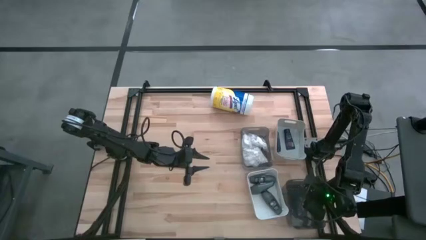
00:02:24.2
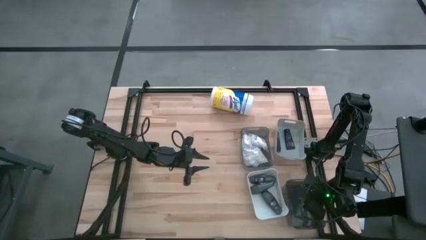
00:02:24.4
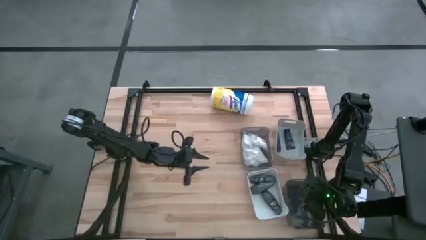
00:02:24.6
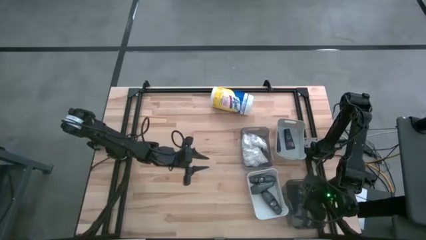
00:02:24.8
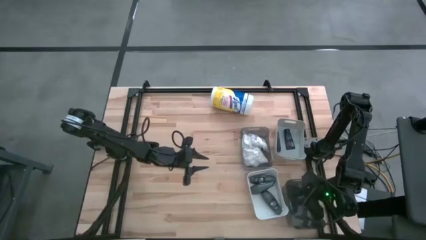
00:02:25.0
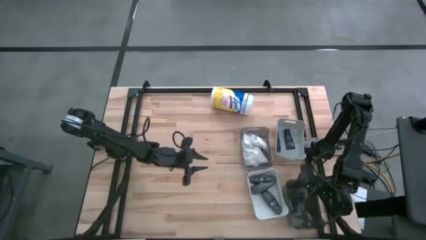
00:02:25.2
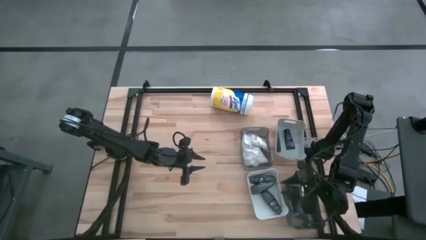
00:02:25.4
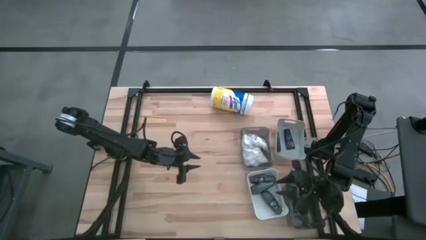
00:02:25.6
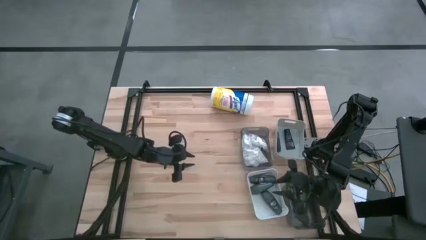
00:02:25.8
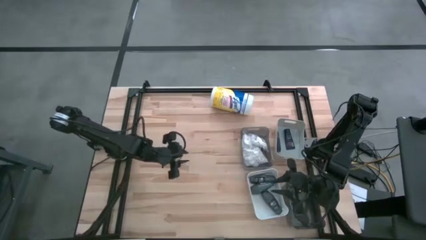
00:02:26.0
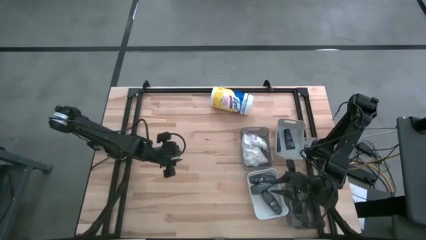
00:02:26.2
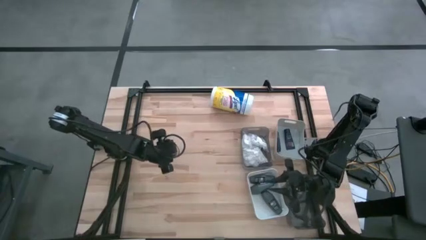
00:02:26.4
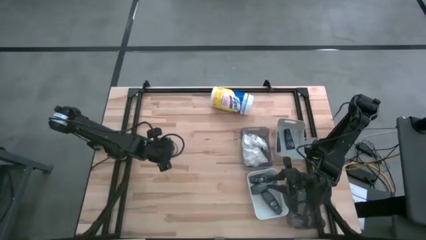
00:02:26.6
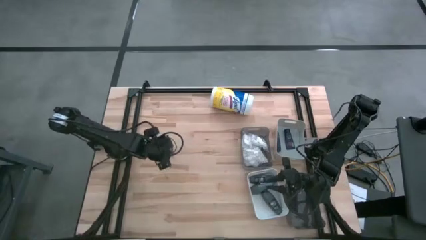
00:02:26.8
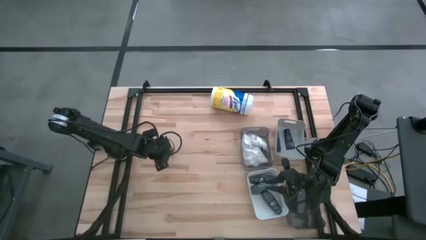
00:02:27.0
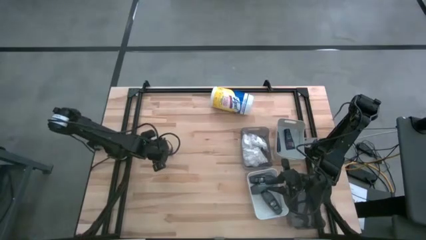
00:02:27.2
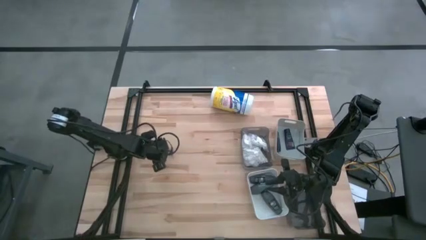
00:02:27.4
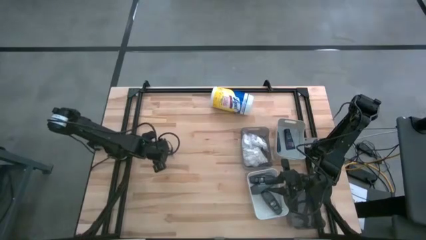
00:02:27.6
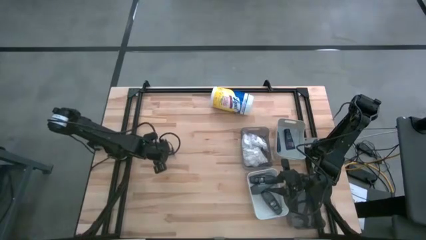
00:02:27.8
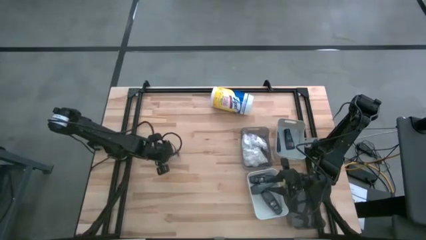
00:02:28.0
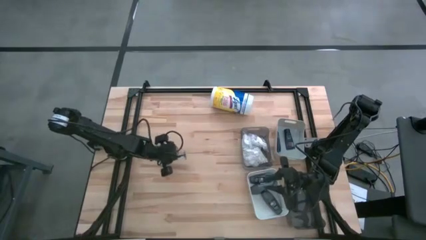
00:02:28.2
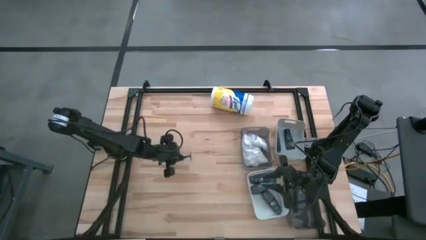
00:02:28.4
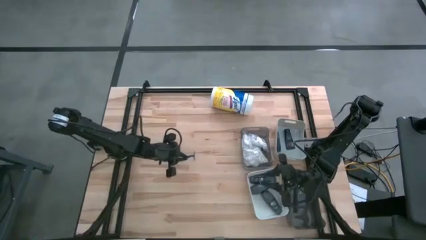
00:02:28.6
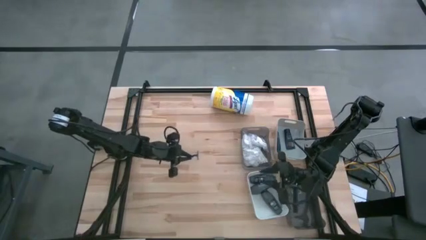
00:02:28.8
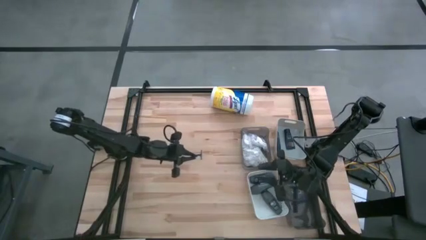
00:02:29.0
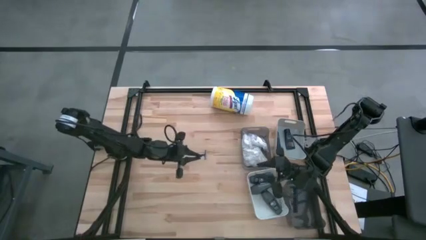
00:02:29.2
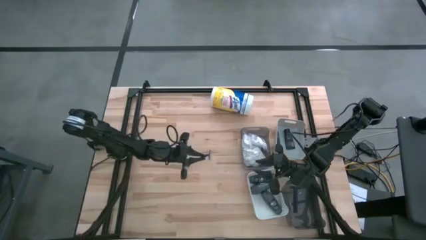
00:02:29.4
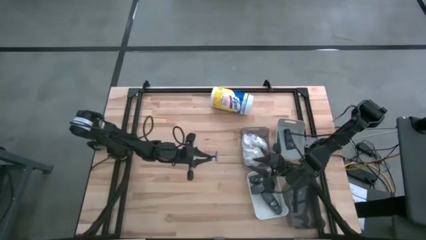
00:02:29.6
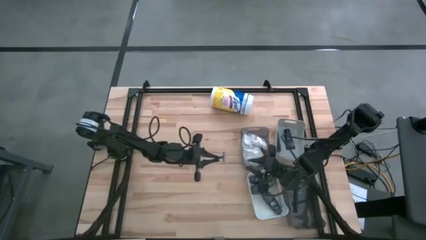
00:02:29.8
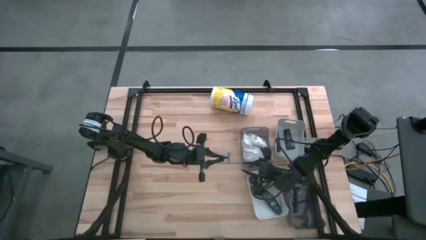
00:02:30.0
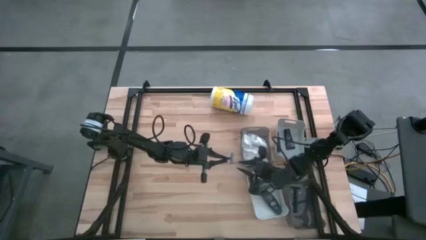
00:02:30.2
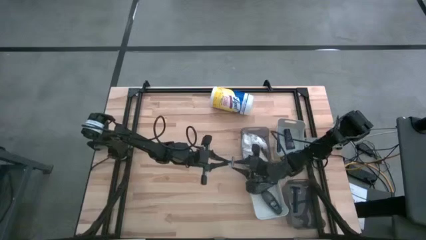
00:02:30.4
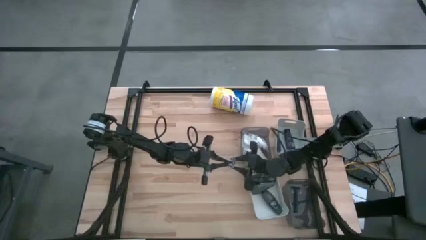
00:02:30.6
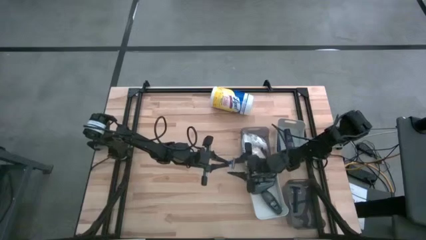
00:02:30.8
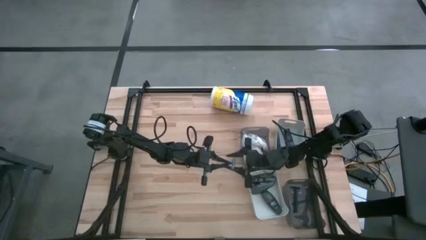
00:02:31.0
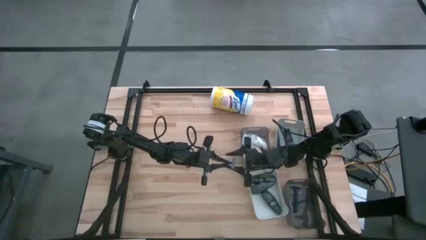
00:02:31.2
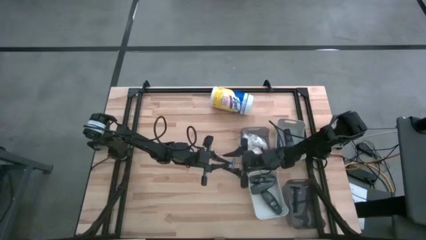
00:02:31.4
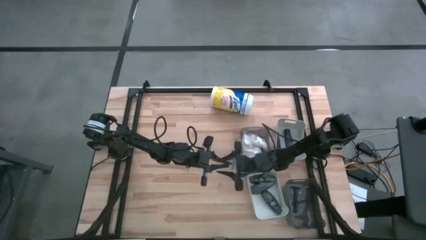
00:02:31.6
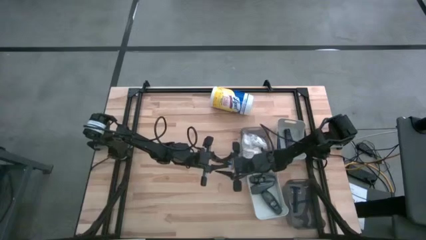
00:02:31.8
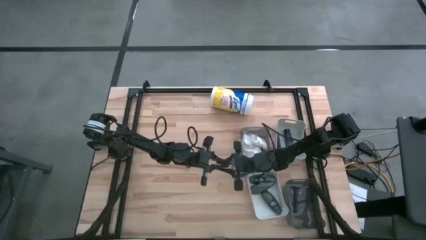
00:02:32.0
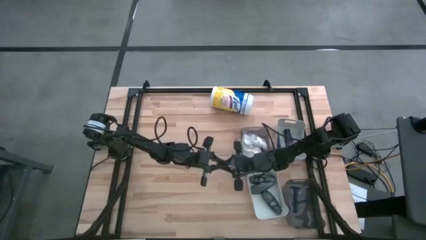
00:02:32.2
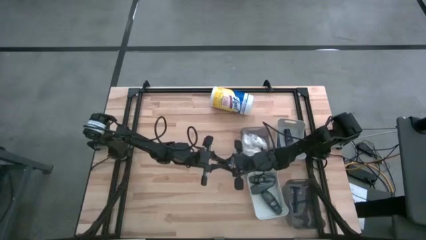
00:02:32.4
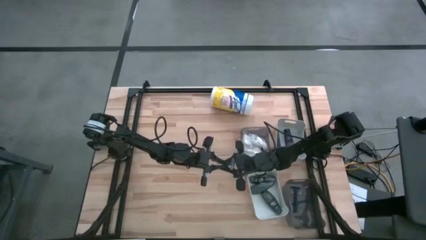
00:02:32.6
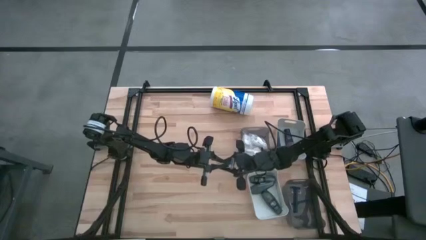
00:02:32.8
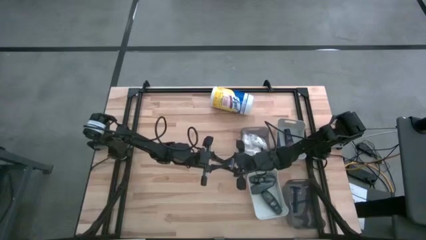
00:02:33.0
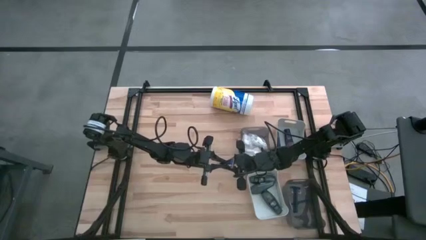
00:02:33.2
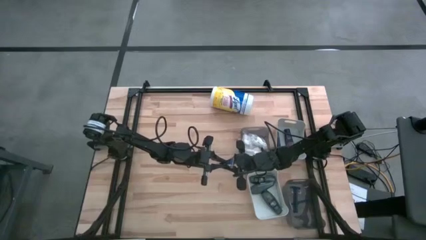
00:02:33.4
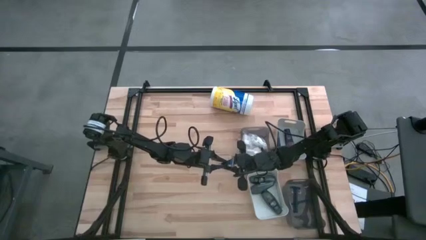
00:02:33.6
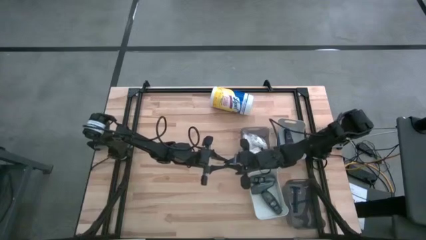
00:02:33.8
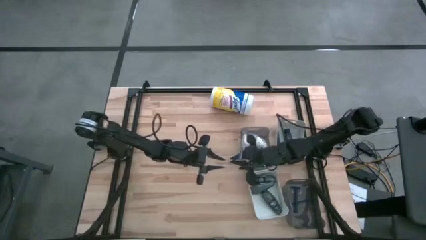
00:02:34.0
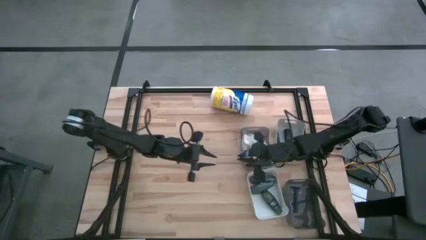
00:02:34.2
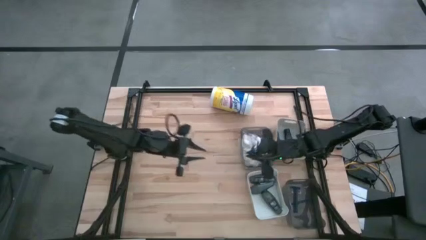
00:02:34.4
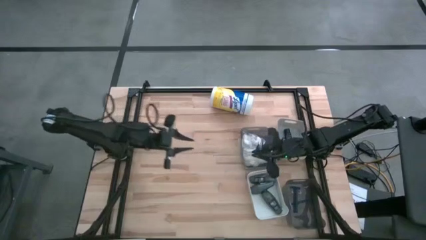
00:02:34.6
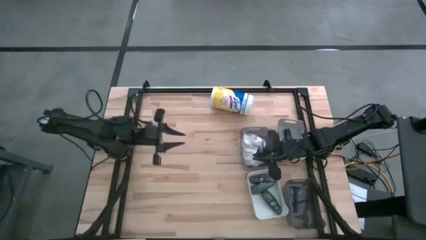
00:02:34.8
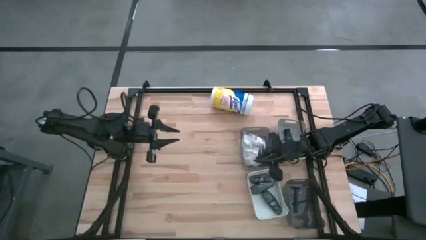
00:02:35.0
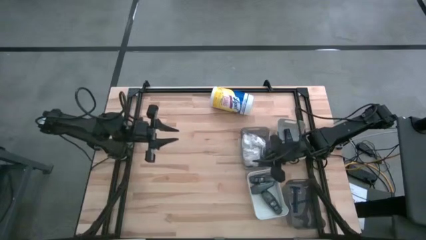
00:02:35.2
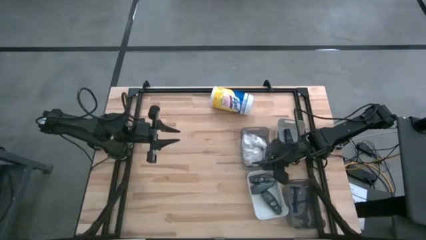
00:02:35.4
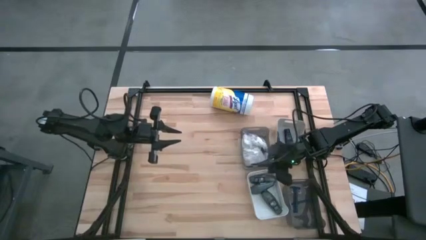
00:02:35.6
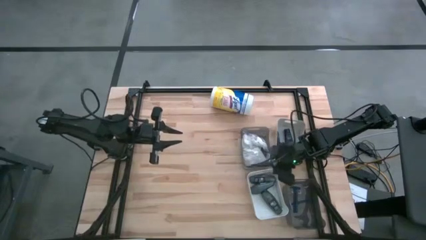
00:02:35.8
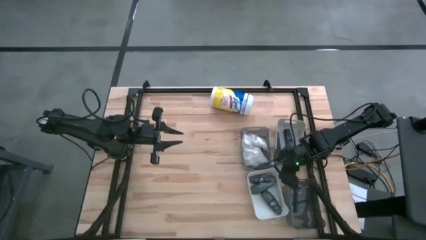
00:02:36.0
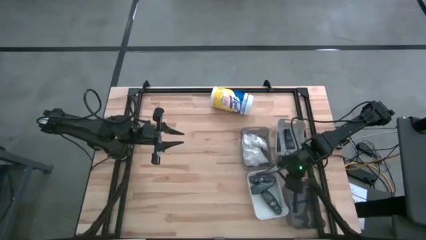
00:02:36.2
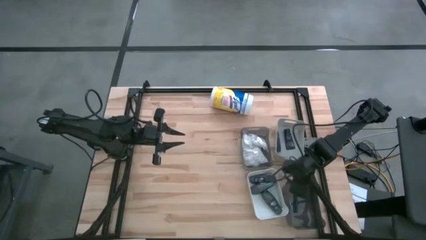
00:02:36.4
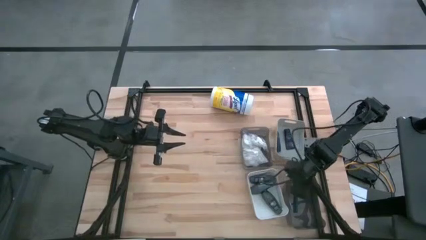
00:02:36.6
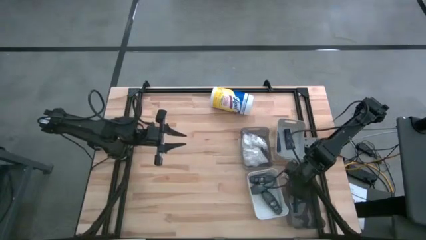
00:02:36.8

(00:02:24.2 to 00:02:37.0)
Task: Pick & Place Travel size toiletries
Put the razor into the bottom black bin

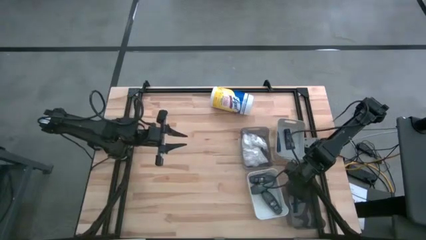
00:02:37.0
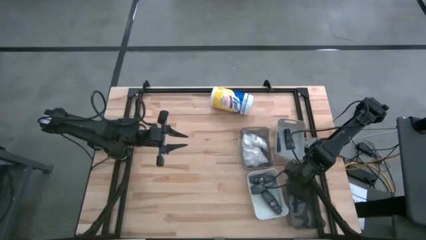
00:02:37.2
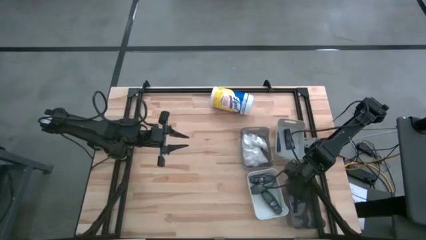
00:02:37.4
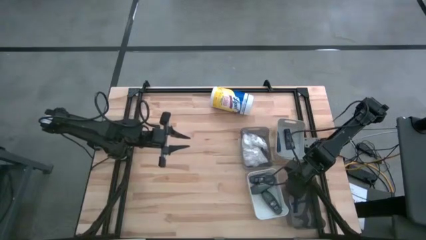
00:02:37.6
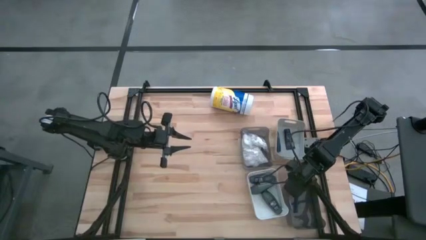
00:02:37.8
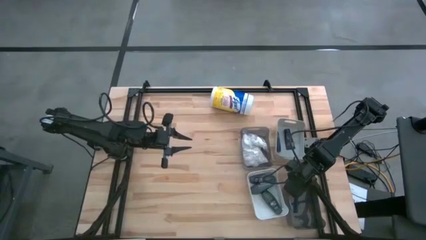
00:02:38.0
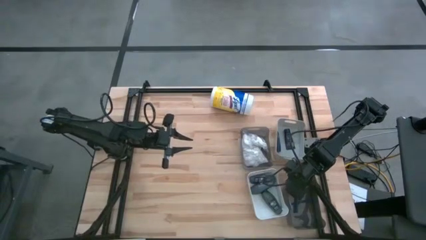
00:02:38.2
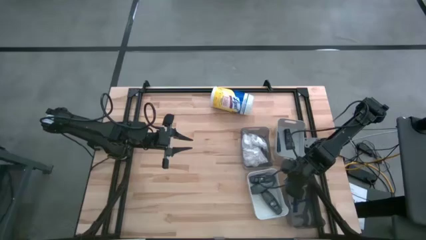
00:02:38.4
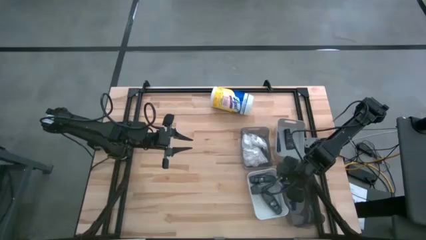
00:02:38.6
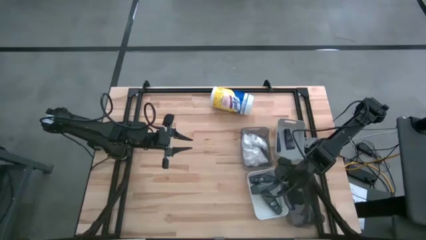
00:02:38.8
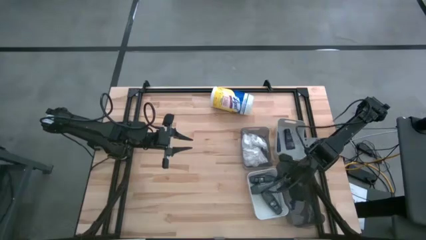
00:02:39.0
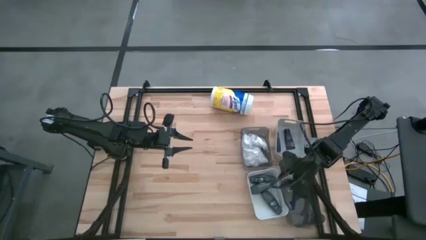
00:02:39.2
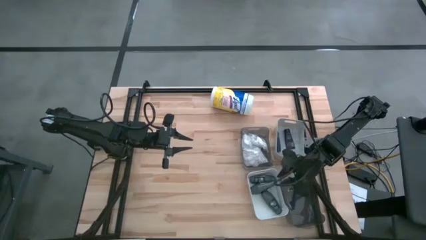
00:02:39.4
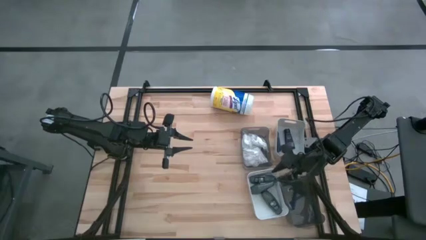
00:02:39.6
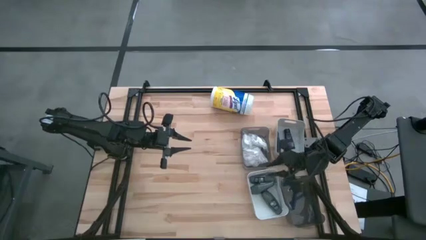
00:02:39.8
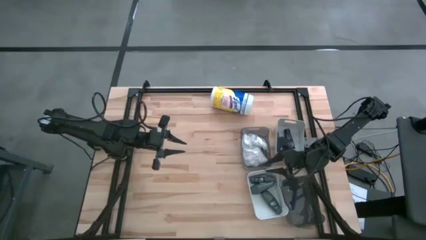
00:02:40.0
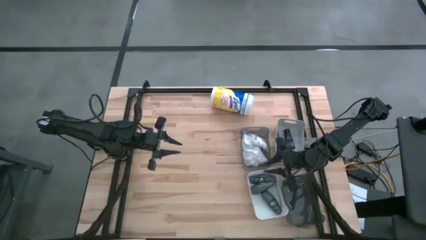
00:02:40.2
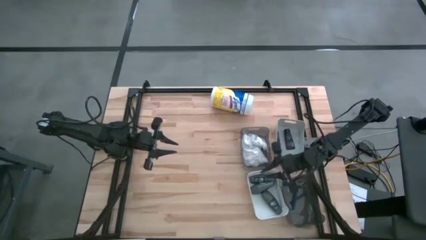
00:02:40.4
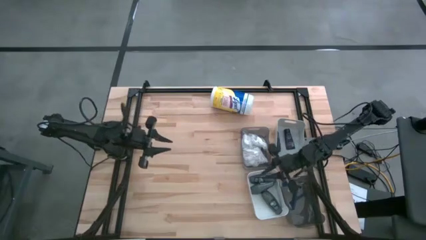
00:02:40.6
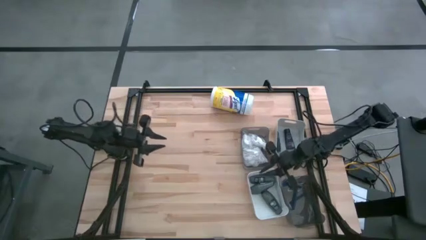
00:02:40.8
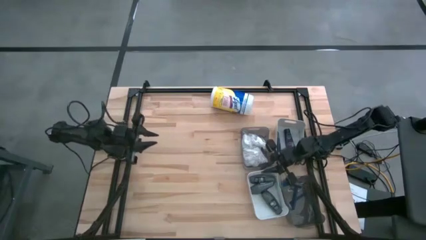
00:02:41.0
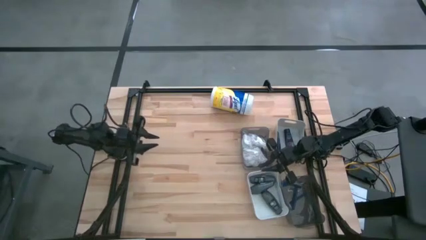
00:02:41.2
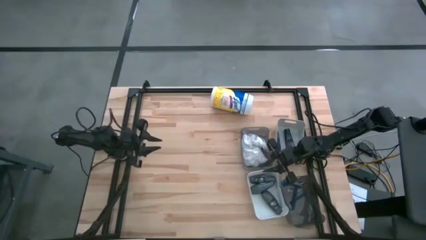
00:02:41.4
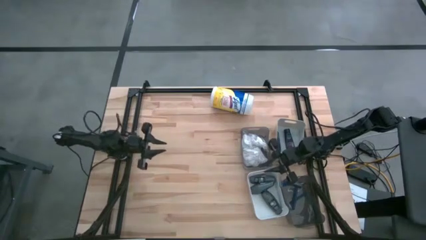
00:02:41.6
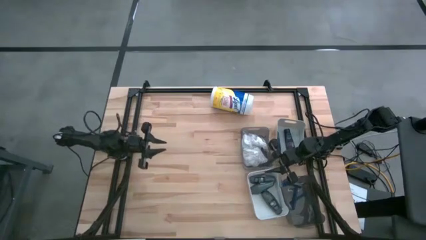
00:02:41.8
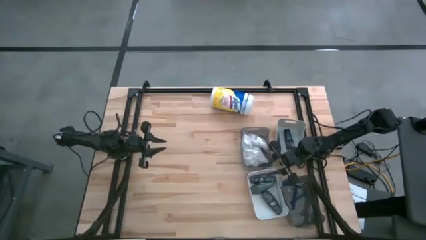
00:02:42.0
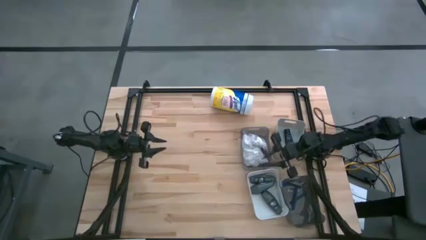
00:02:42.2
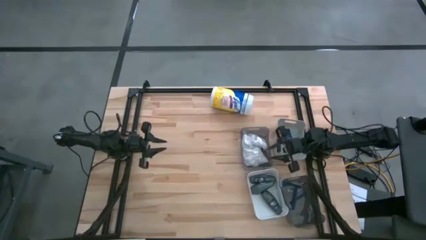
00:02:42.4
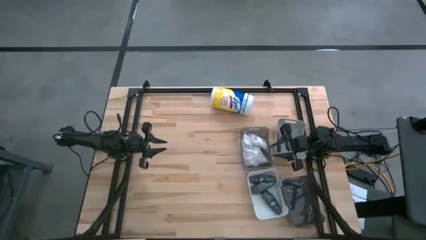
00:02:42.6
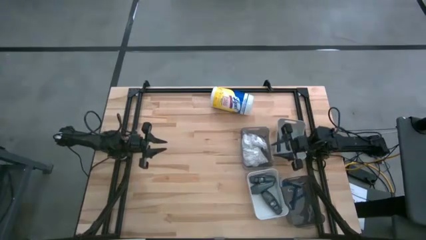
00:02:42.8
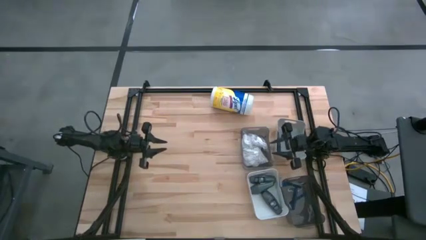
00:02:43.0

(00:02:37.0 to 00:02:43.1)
Return to Home Position
